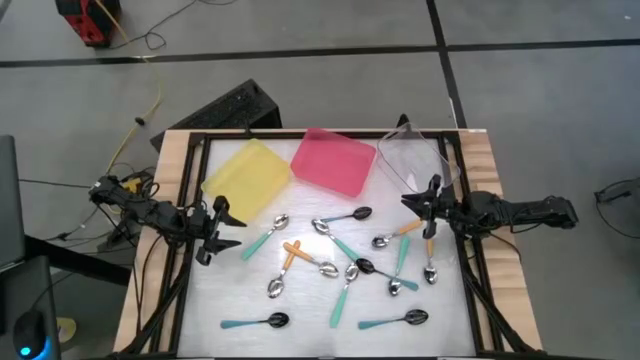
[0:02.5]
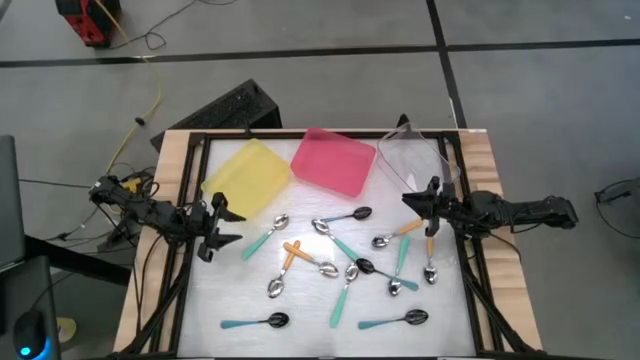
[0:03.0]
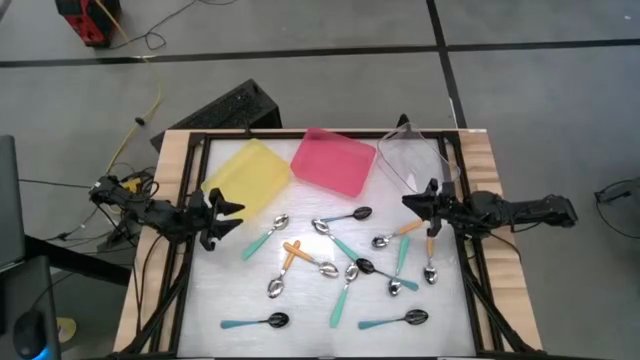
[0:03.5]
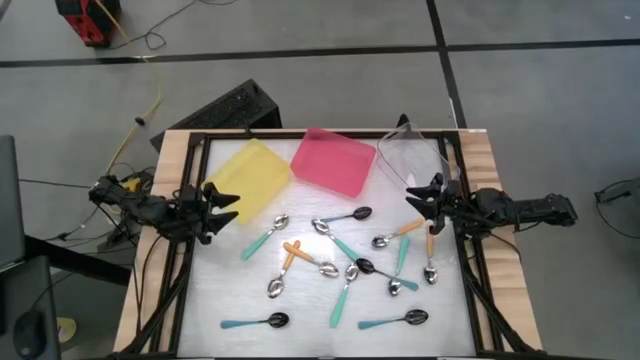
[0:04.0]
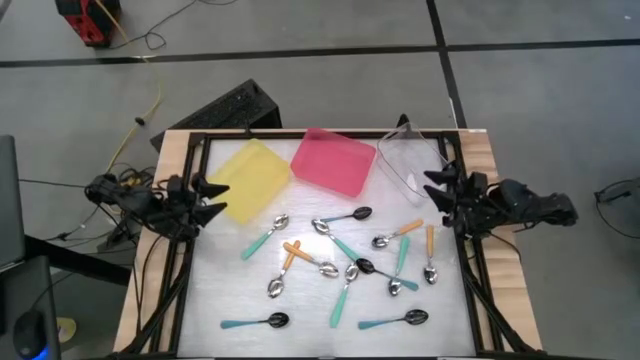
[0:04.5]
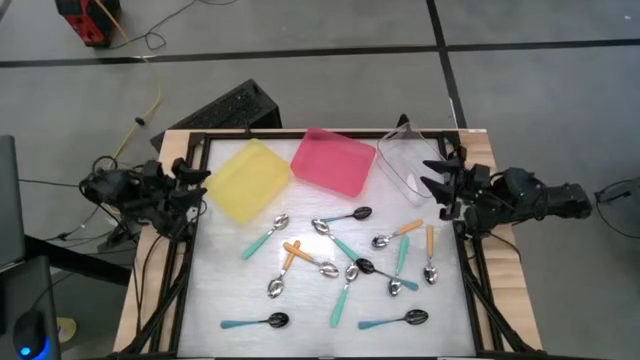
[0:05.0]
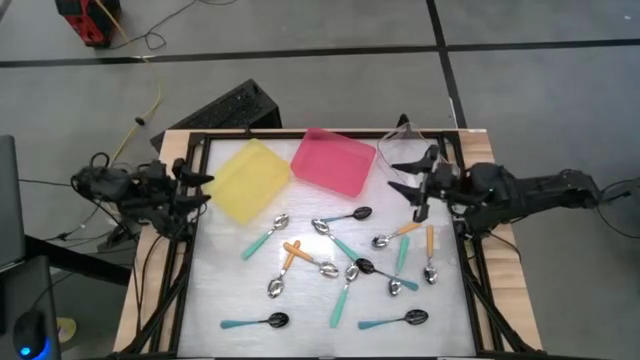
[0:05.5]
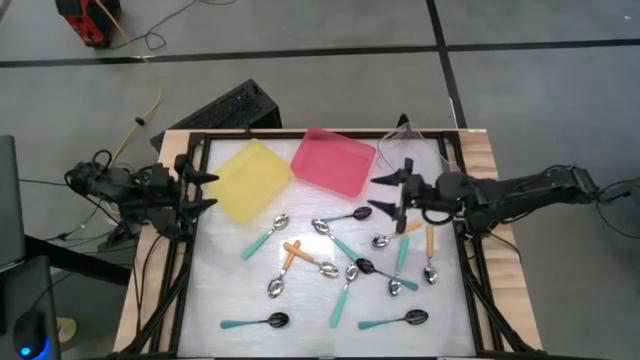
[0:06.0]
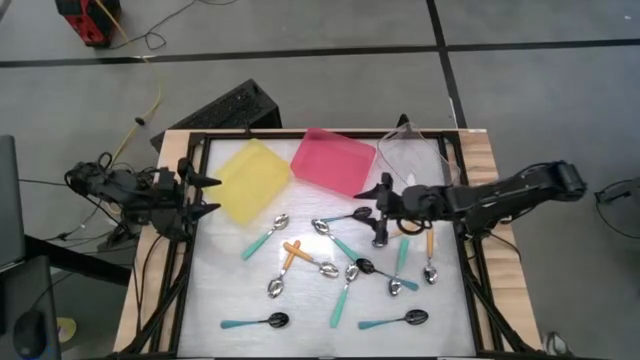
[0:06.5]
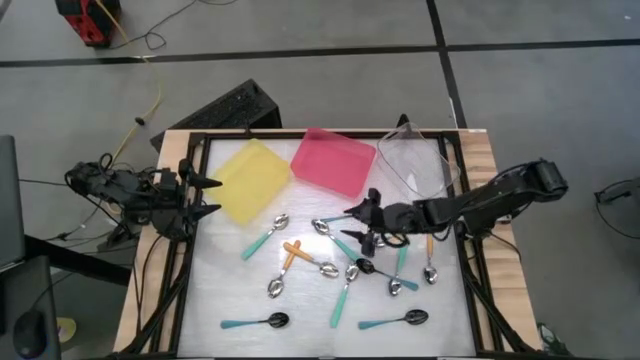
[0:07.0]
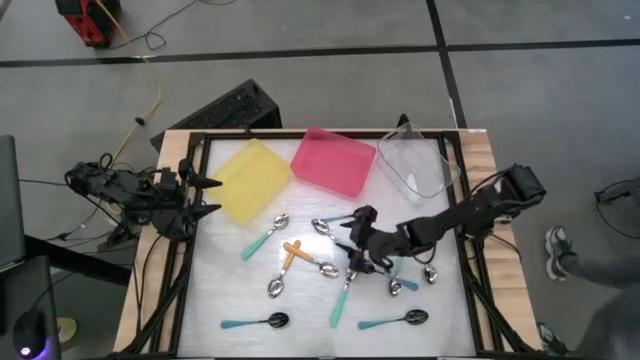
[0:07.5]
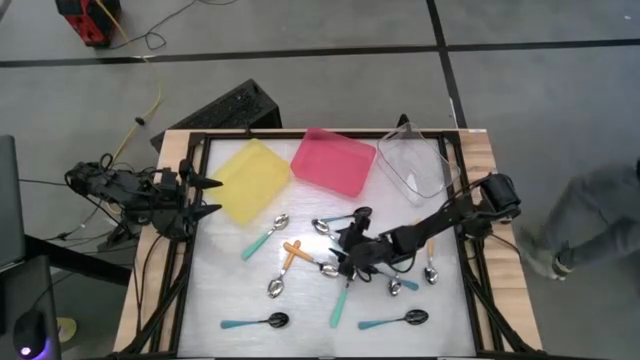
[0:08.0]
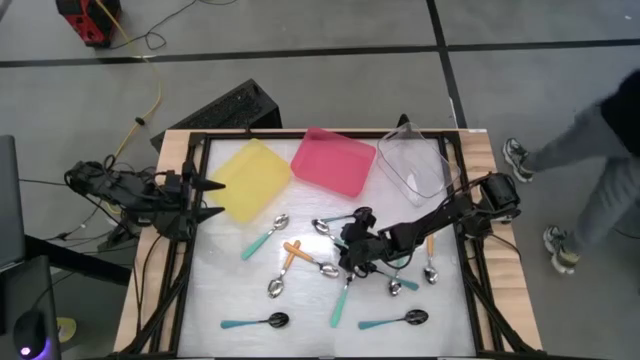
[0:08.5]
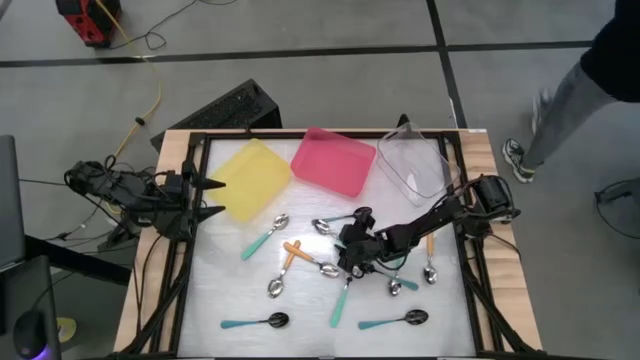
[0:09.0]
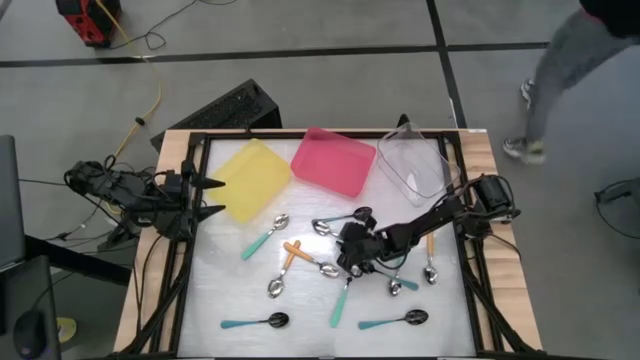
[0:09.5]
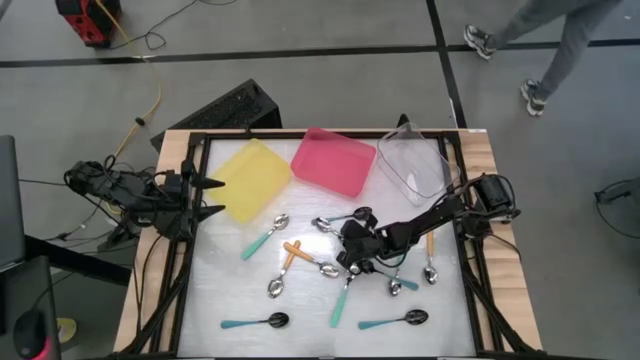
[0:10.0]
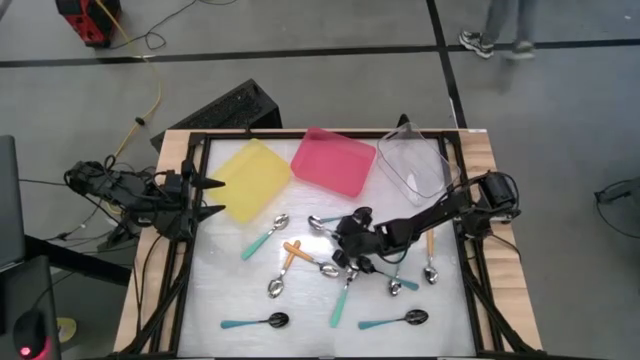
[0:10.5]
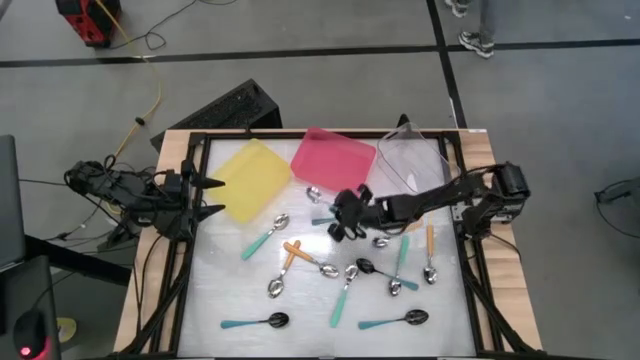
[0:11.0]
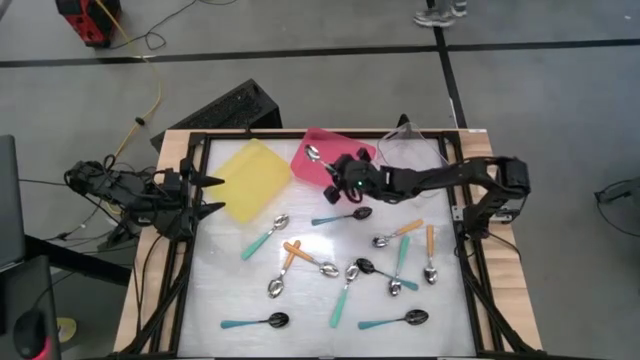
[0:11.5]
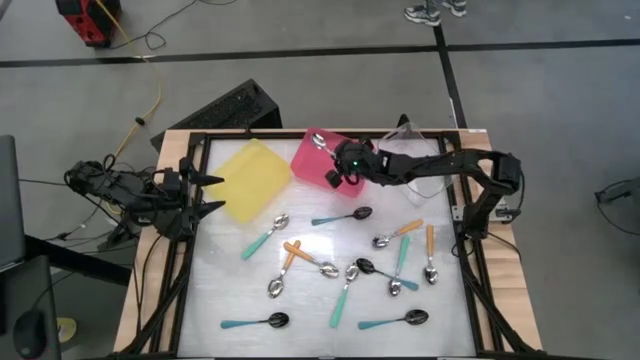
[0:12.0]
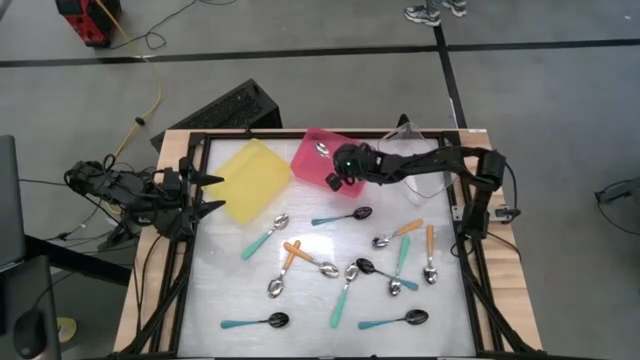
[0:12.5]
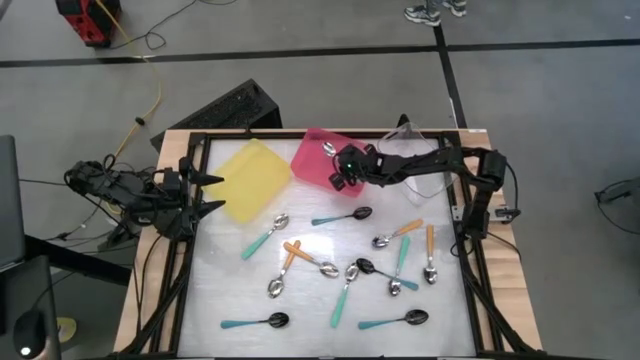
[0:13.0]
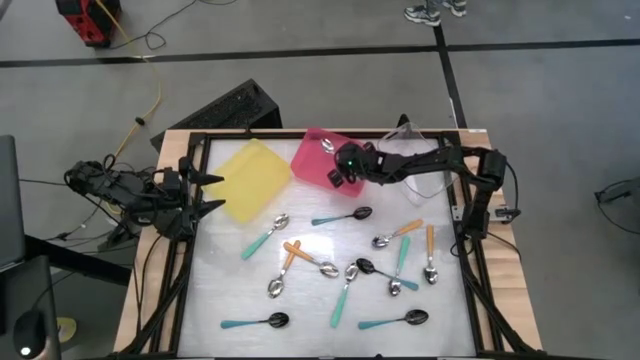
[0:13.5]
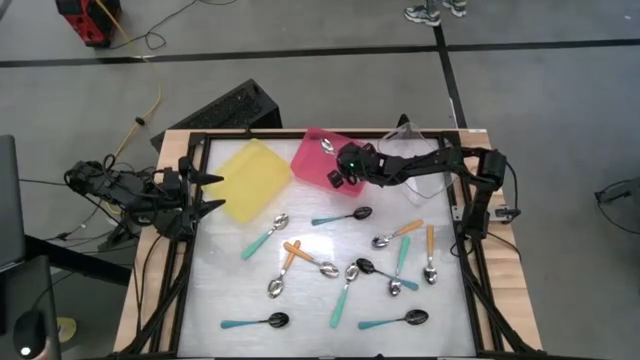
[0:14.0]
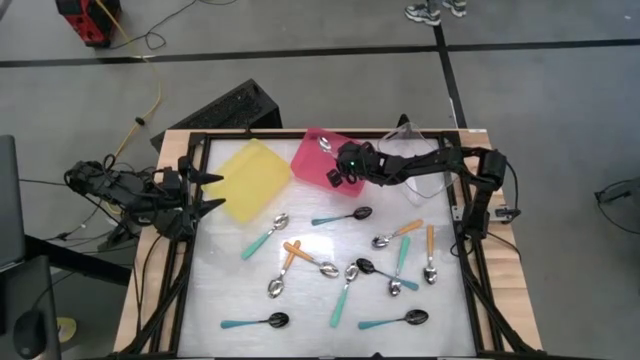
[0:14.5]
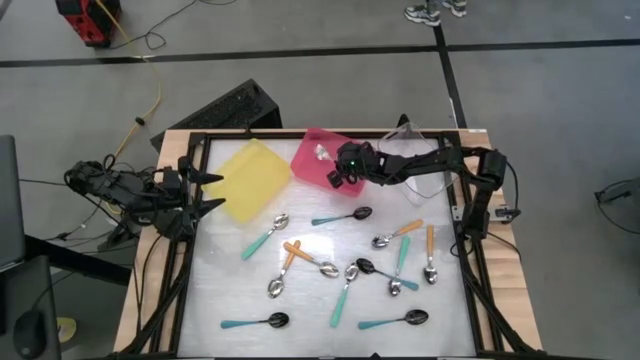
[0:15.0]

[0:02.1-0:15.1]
Task: Sort silverware by color (type)
Put the green spoon into the red bin
